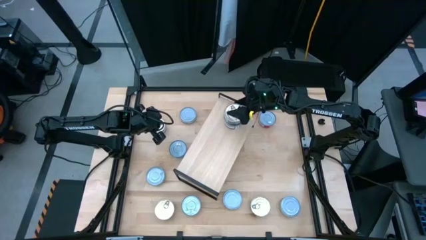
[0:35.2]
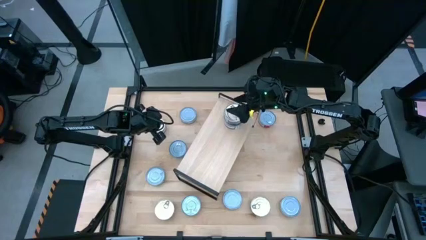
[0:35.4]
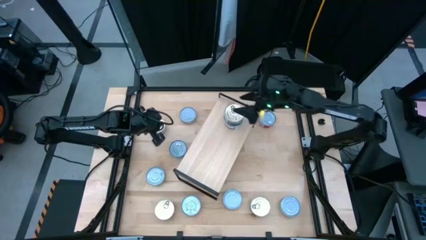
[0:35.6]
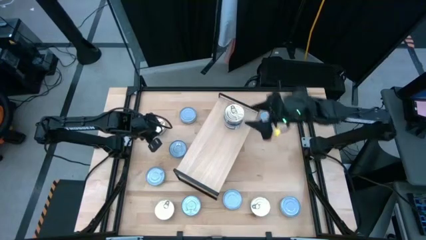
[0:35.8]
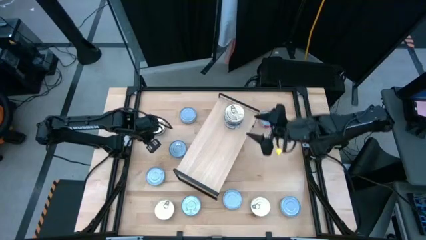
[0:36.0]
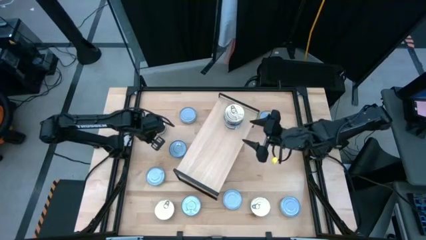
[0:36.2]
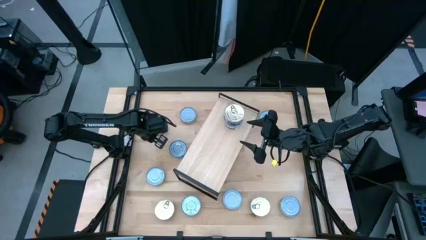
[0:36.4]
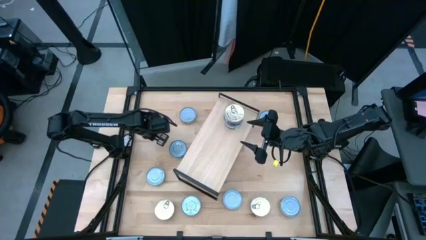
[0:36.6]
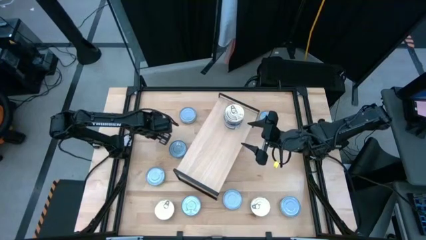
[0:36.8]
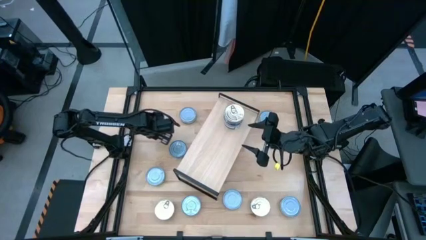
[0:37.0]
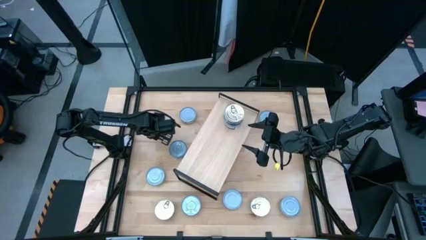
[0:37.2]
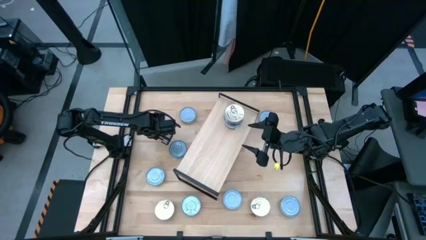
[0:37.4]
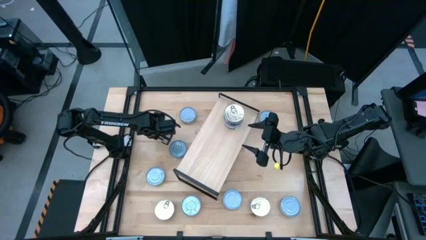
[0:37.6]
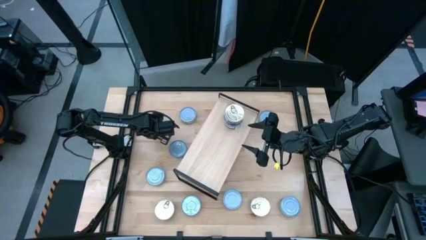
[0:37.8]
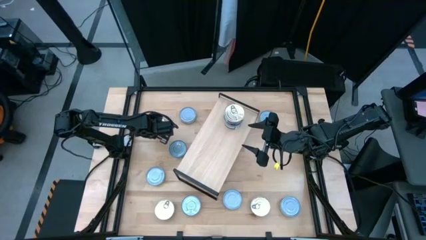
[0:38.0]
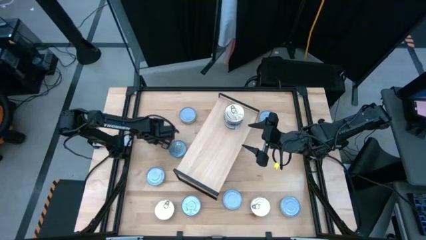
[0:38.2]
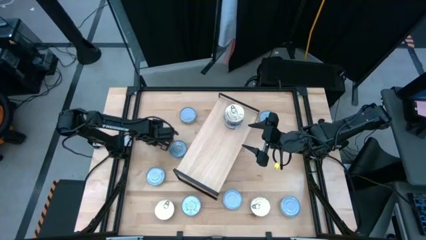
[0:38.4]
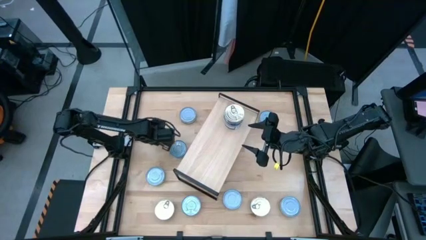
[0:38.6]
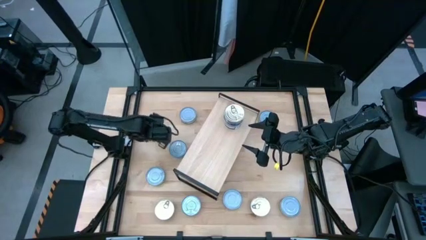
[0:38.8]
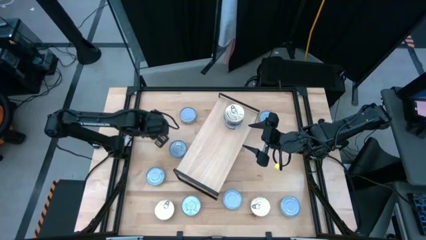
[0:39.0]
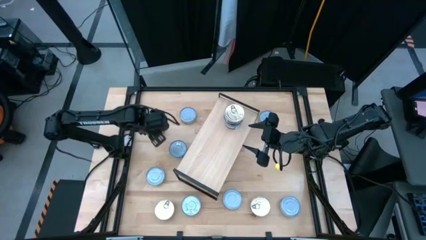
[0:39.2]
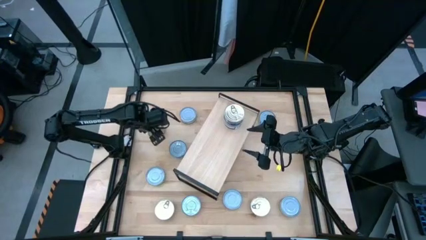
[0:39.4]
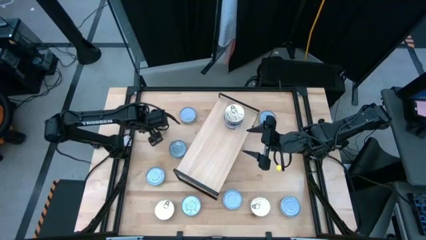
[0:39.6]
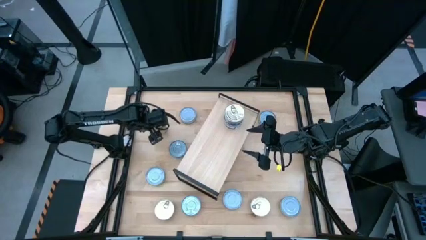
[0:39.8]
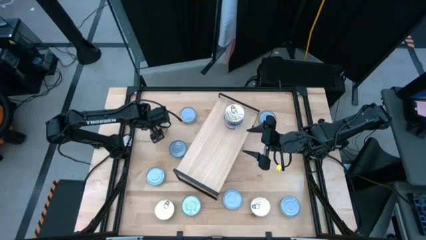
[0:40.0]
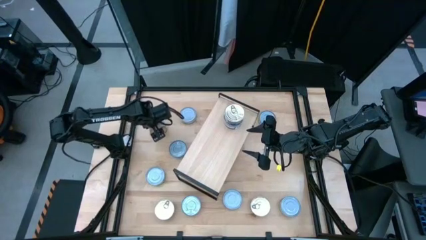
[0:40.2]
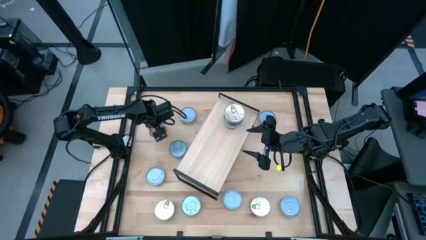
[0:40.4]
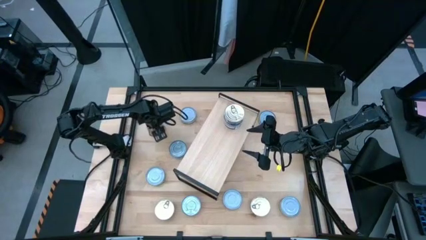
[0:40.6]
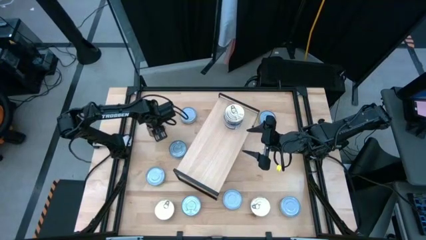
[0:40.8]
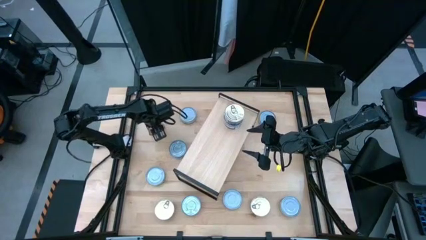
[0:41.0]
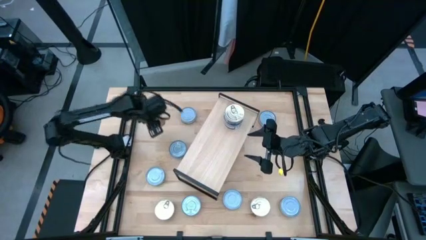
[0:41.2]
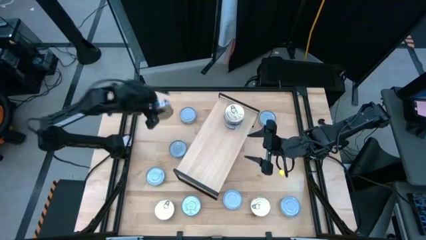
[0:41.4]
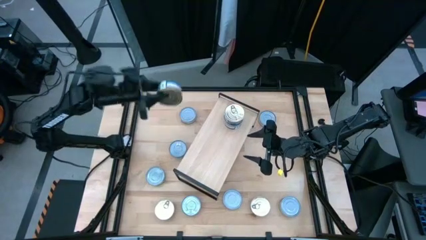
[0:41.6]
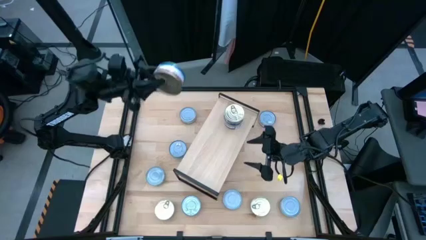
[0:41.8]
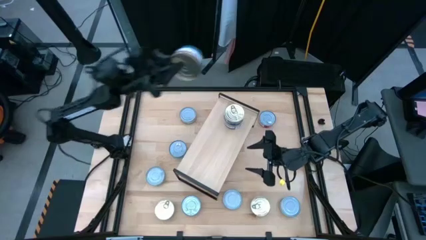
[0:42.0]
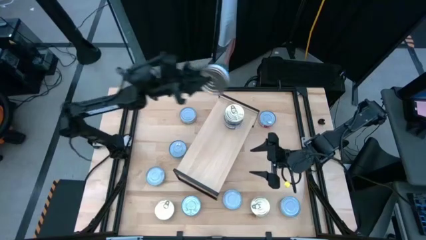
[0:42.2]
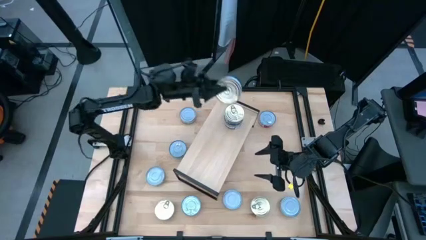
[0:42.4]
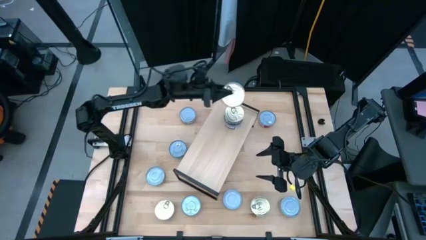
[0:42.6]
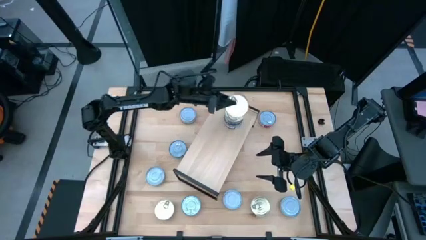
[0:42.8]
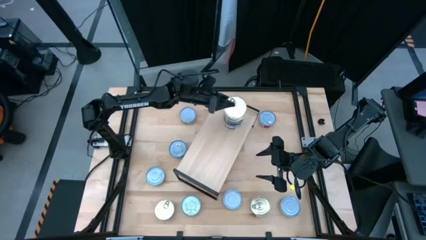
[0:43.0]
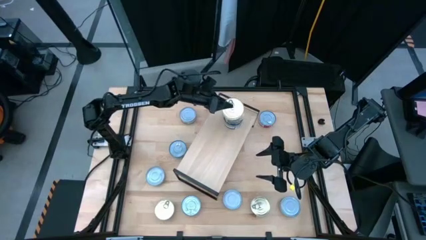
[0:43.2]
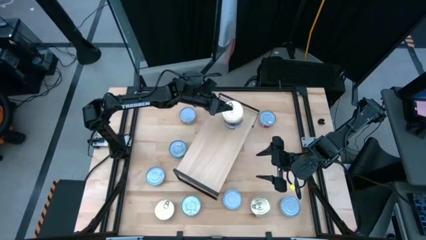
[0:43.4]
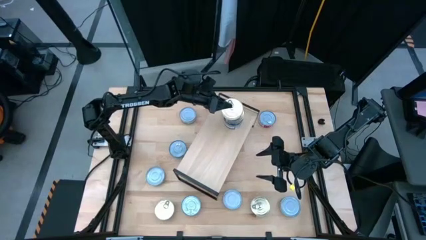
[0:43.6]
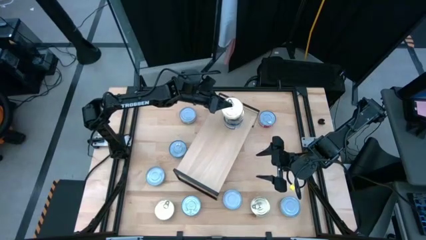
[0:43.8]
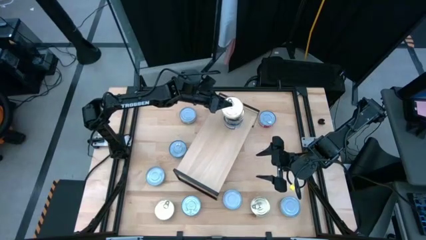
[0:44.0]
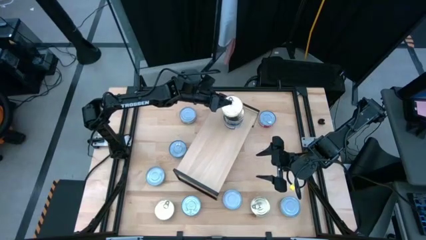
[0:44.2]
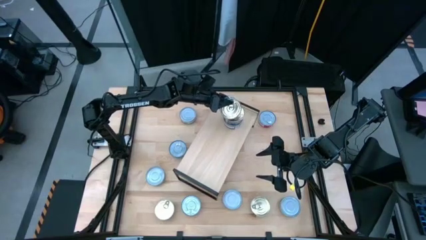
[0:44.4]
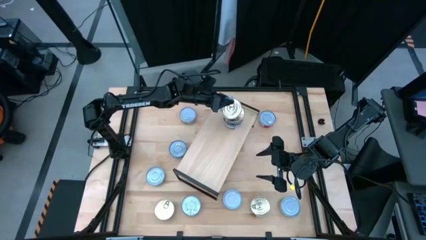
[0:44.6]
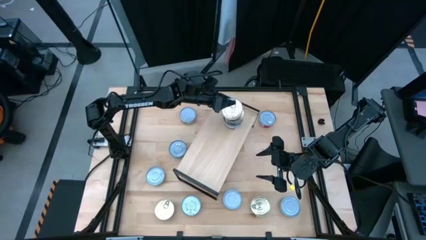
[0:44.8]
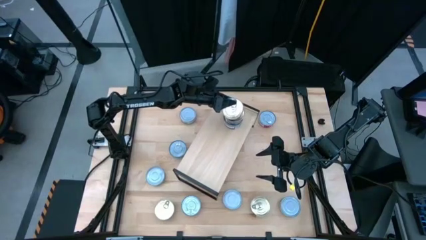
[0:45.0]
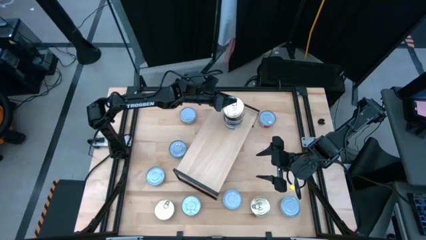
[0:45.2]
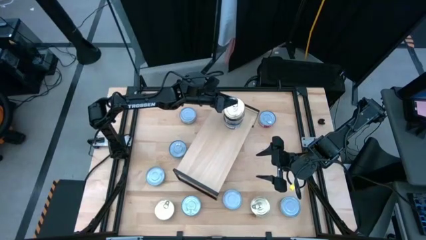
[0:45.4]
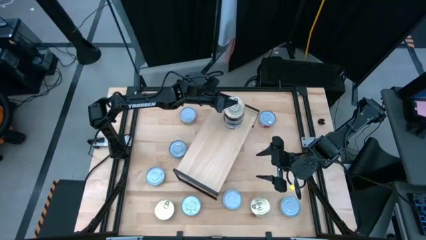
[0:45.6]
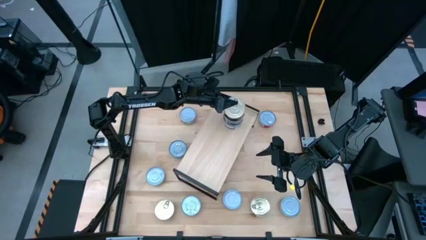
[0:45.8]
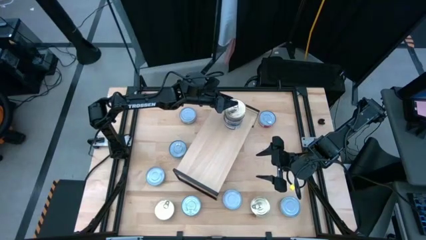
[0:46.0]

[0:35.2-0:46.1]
Task: Stack canned seafood by type on shelf
Stack the blue tuna can on top of the blue tuna can on the shelf

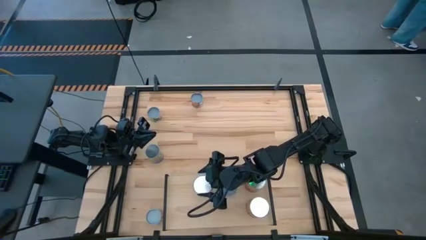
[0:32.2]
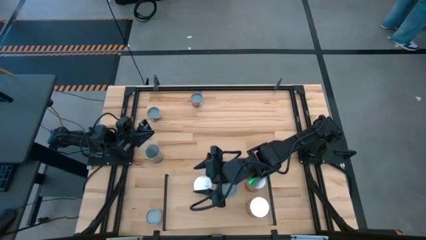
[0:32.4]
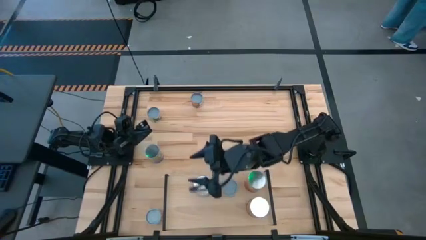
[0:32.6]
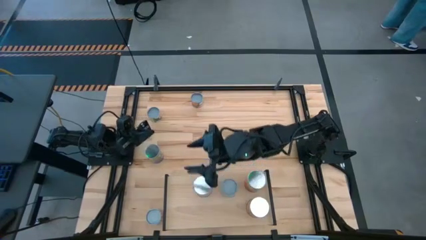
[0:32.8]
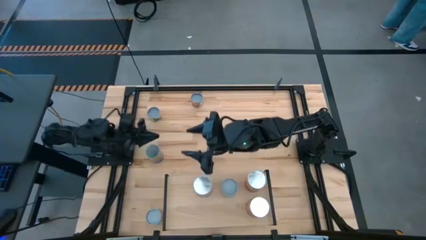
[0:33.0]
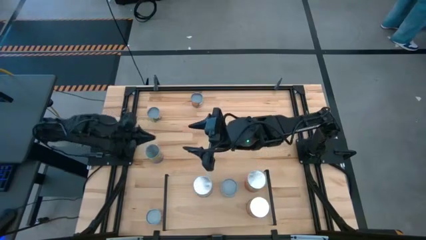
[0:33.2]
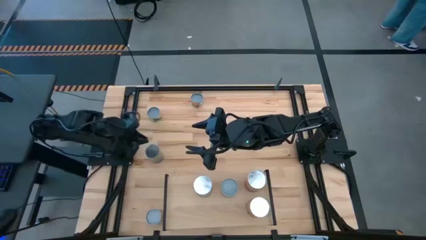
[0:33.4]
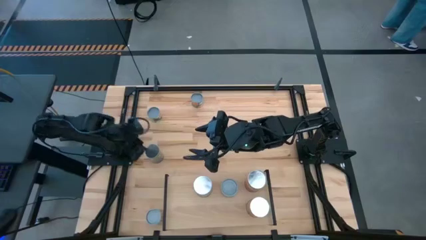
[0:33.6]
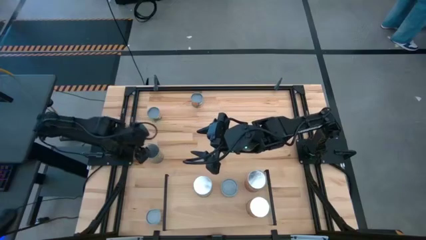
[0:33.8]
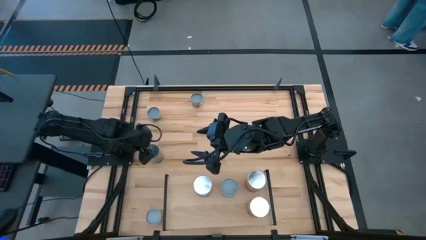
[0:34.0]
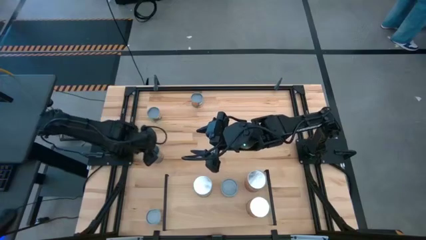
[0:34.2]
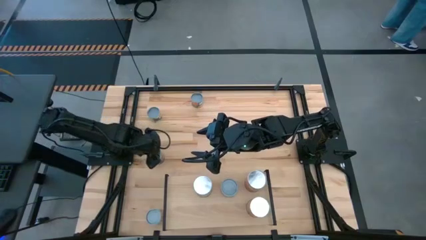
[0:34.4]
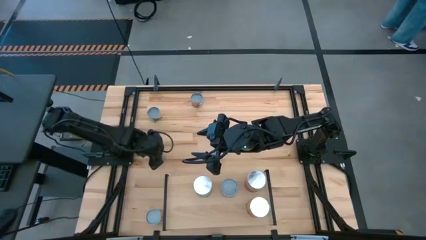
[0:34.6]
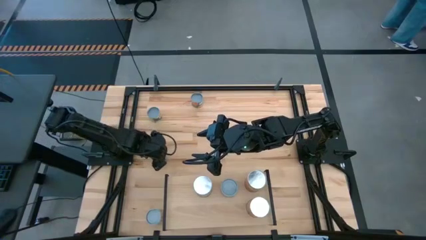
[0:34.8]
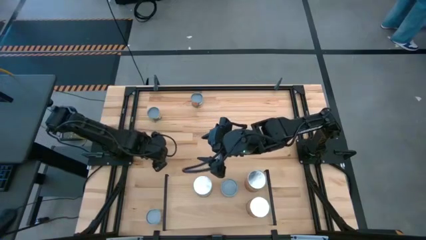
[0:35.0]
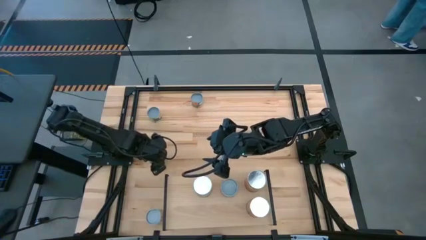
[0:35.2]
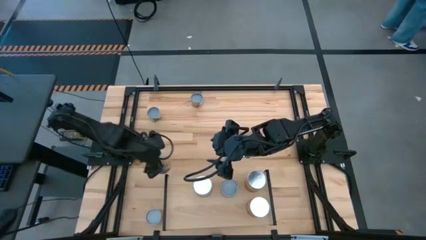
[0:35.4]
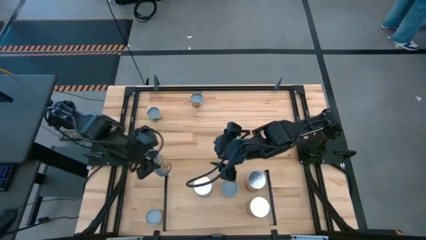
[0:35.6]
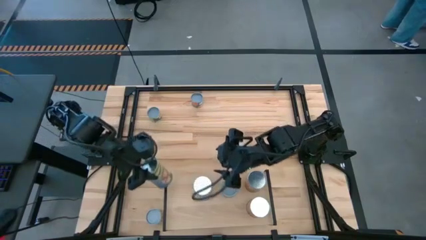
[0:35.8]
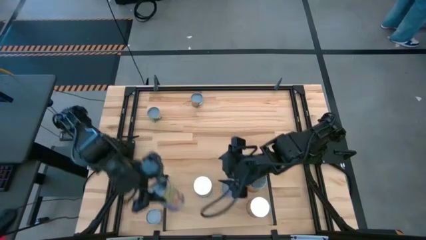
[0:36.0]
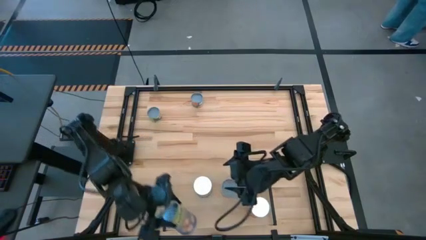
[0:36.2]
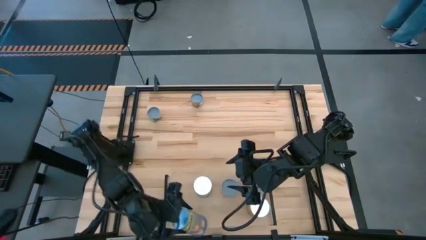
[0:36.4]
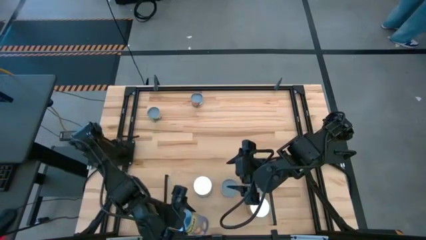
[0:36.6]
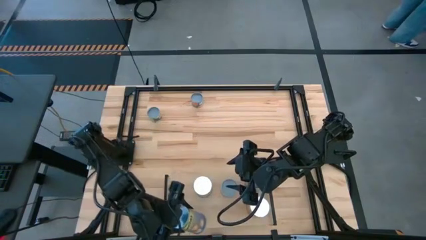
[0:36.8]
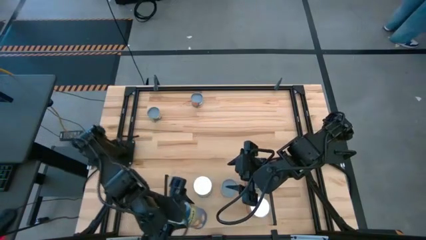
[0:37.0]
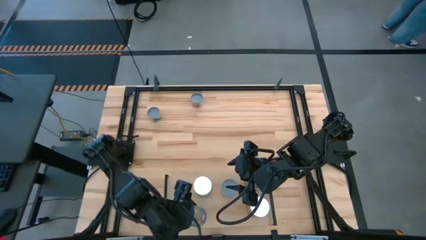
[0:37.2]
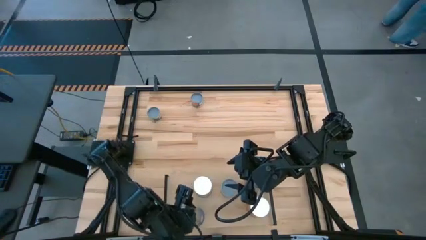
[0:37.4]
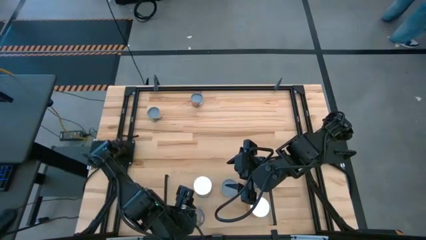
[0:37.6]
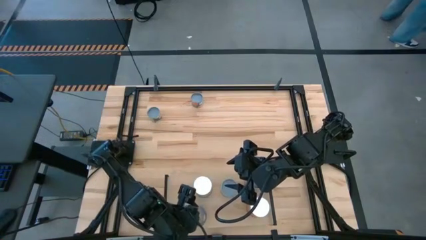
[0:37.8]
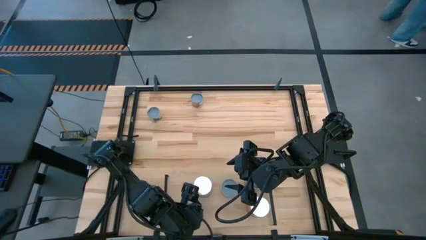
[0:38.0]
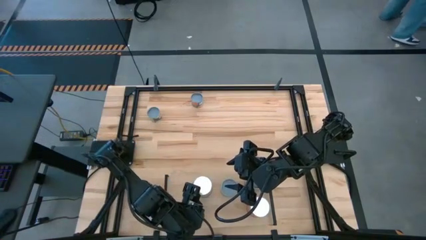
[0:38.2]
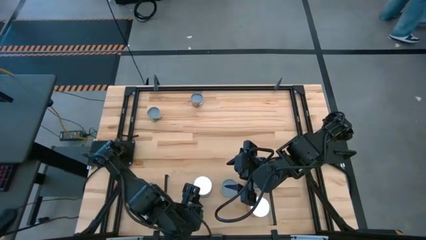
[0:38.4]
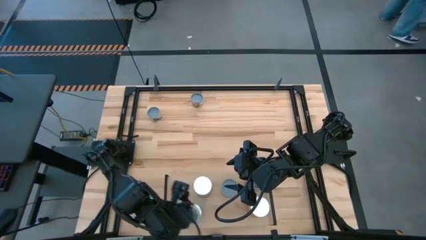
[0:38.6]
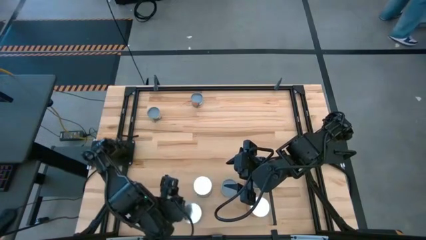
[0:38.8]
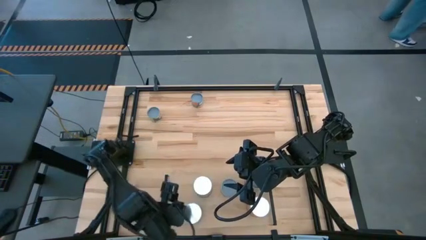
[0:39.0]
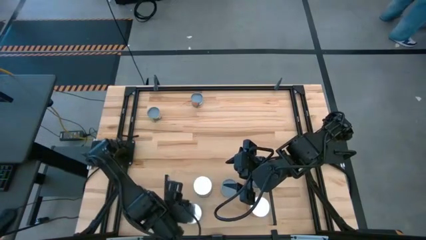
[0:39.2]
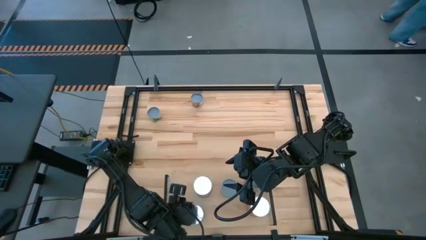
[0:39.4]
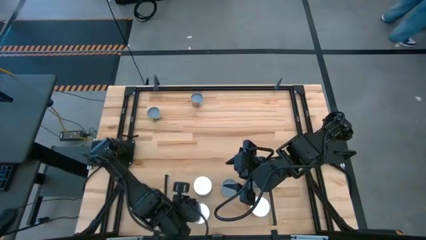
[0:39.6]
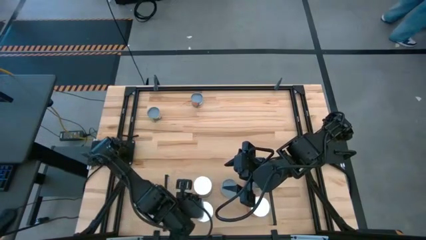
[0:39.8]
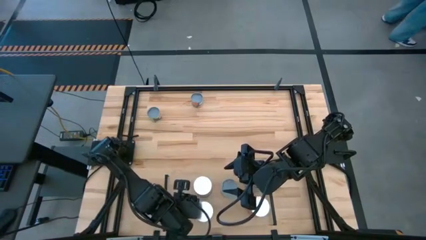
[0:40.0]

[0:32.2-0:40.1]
Task: Pick and place cans onto a shelf
Put the large canned peaches on the shelf
